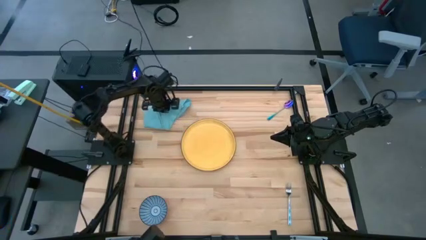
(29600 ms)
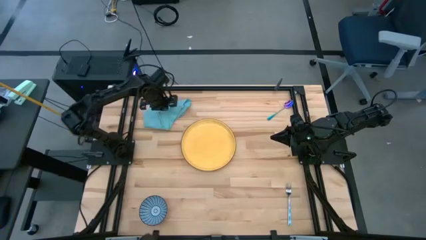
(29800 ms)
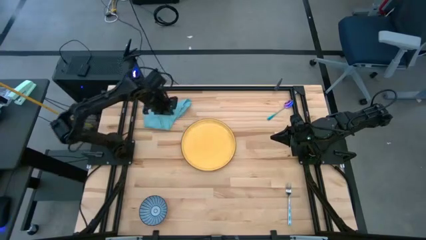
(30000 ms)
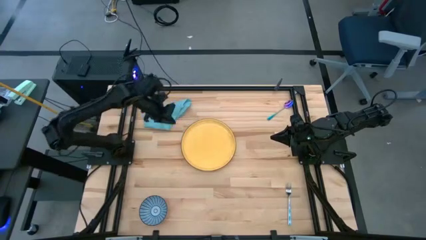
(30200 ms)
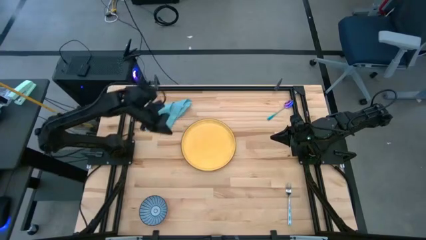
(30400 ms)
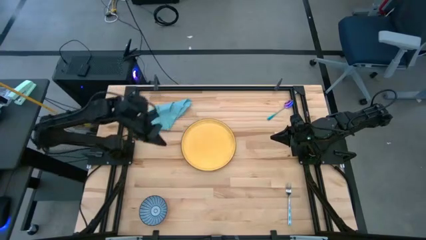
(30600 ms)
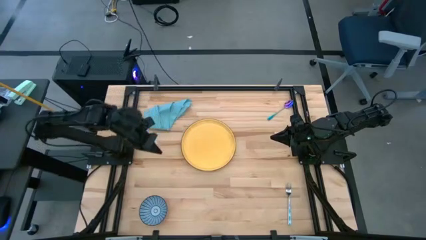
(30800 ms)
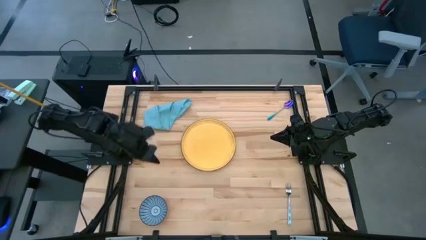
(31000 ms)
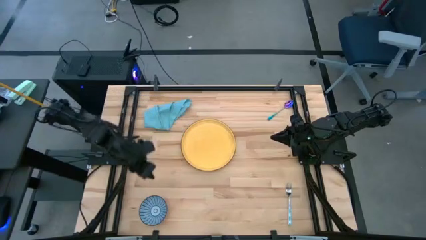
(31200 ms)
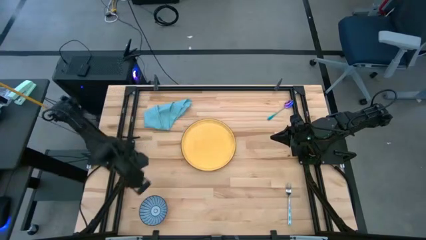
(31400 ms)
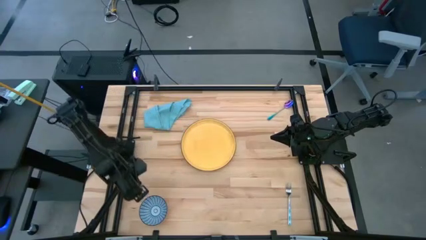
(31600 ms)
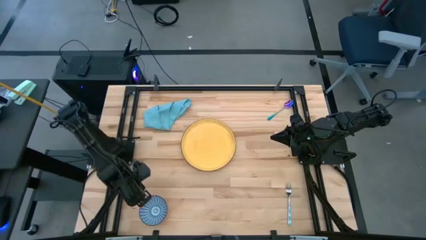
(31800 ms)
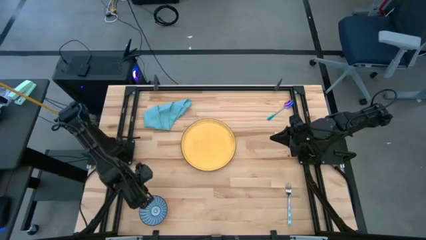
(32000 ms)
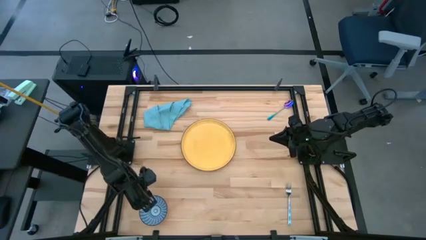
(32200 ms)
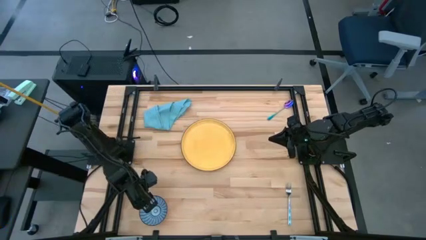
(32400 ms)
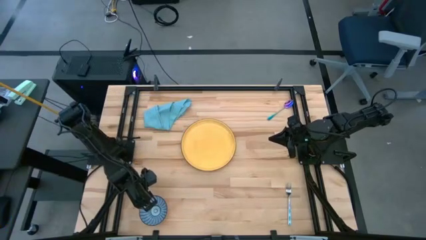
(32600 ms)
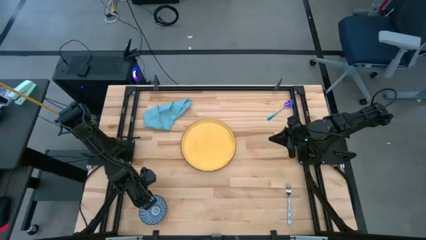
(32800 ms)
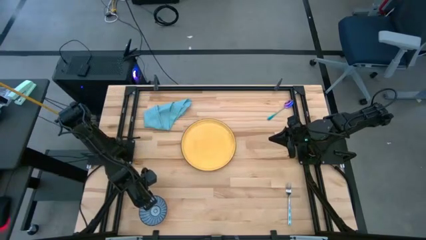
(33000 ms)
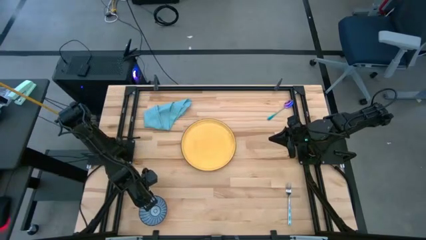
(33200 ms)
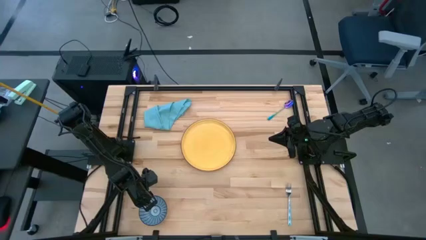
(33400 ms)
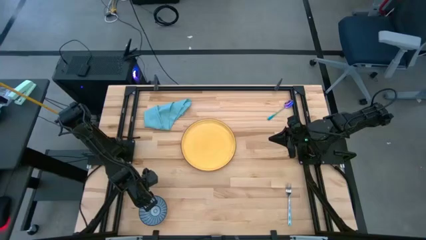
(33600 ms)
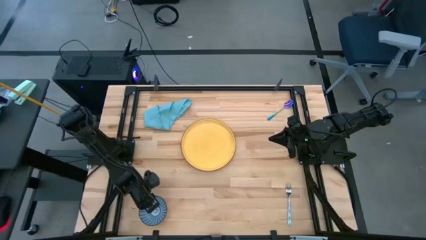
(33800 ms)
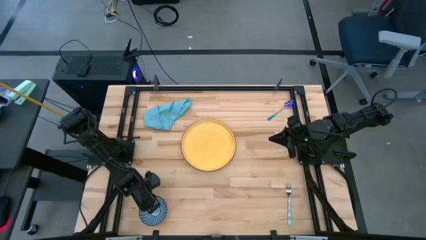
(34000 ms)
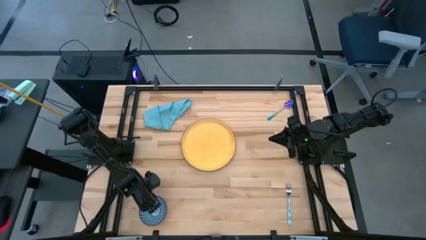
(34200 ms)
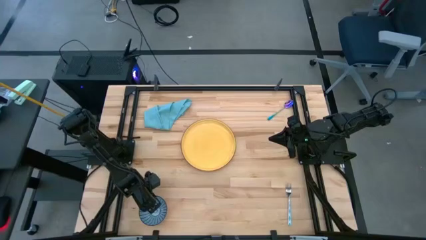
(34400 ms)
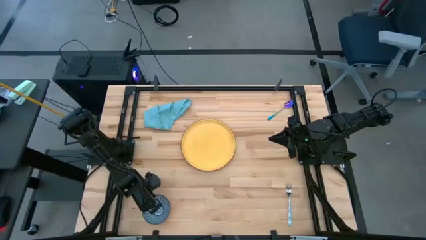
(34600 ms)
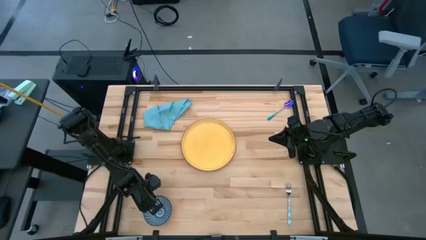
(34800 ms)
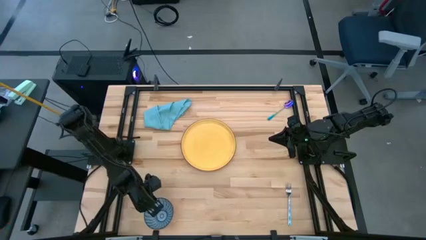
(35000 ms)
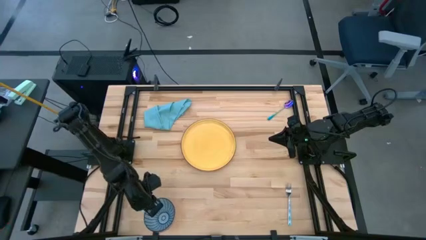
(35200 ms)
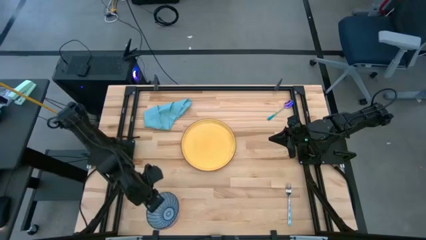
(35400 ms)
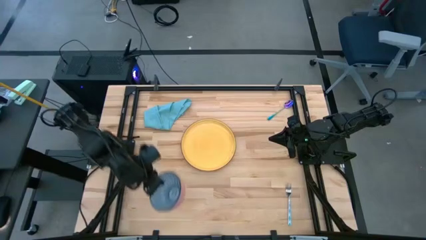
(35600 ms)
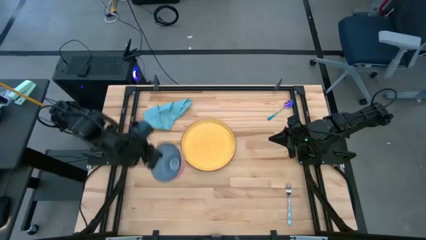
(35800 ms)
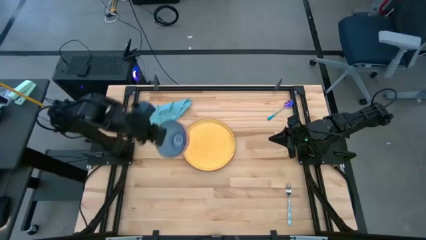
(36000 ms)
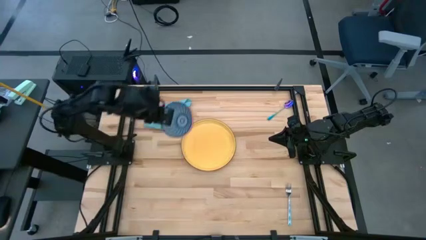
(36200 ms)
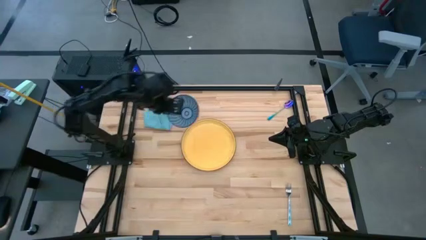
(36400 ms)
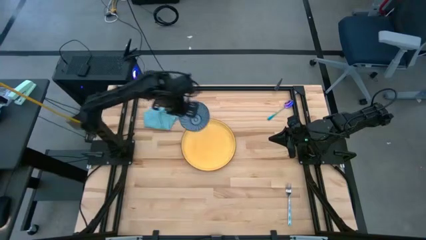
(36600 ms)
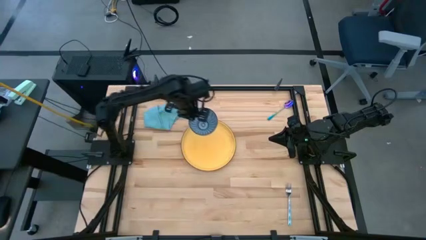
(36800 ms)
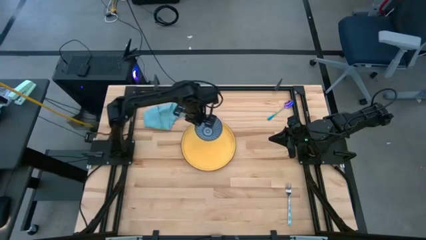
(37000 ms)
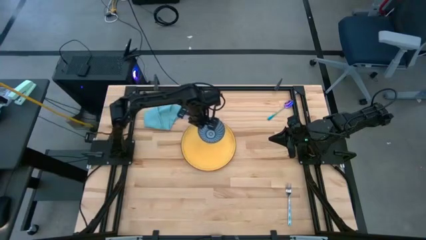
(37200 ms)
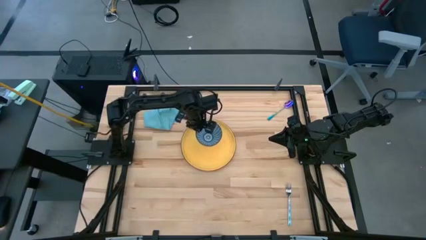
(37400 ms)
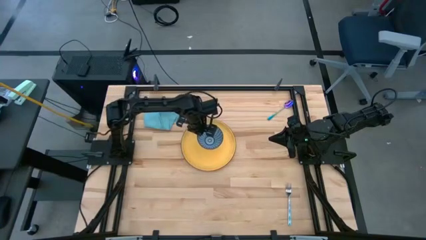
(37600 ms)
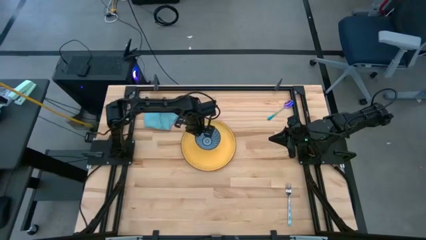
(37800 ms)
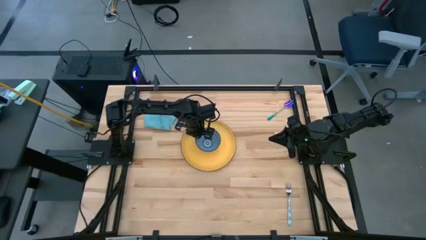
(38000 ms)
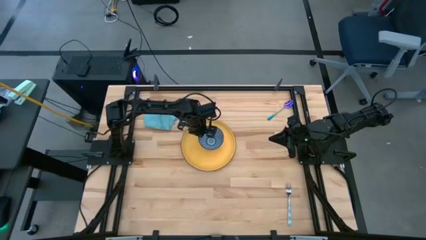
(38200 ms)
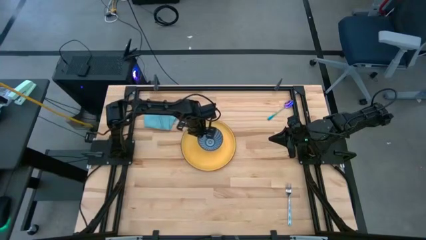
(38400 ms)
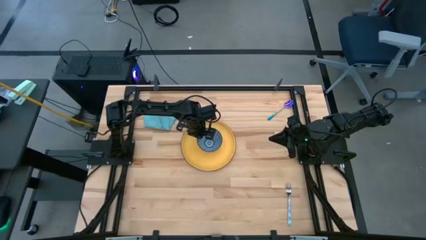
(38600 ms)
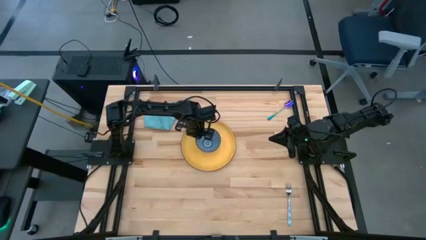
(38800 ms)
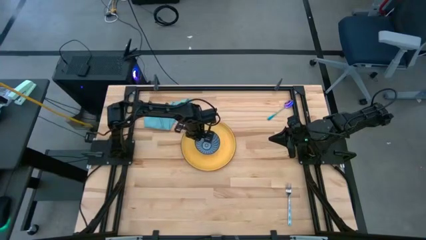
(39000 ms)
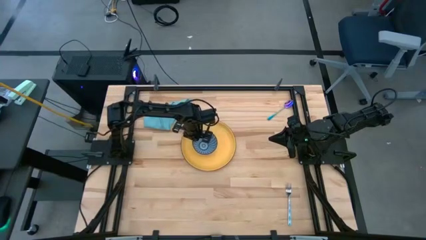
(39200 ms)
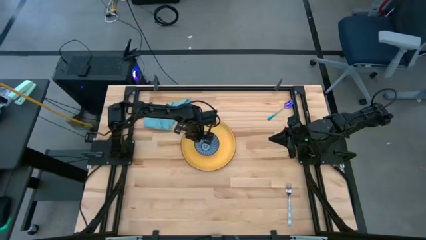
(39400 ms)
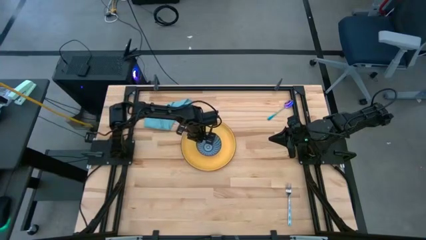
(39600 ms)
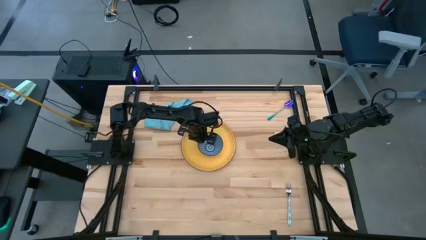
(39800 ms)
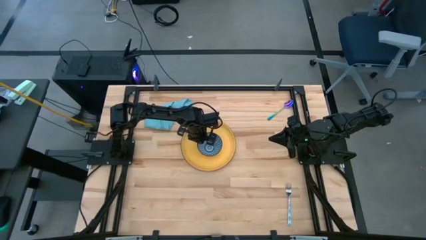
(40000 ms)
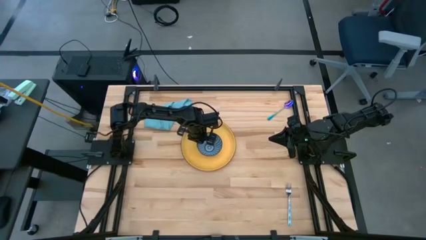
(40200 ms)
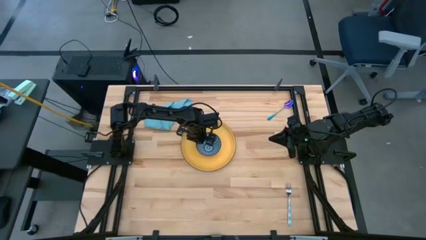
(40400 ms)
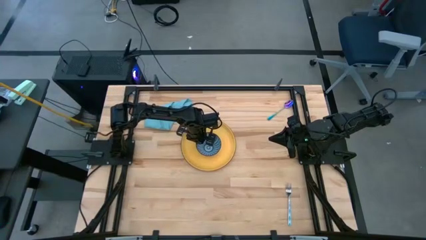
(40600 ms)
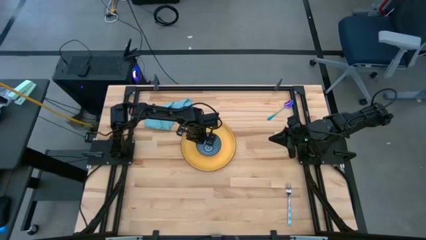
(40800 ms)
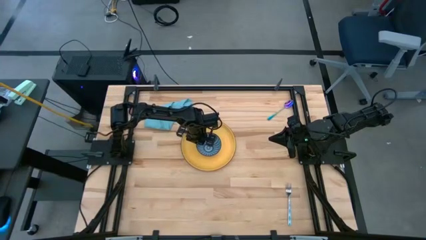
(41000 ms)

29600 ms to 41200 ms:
Task: Set table place
Put the blue and red bowl onto the yellow plate
